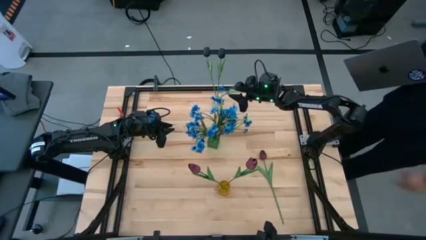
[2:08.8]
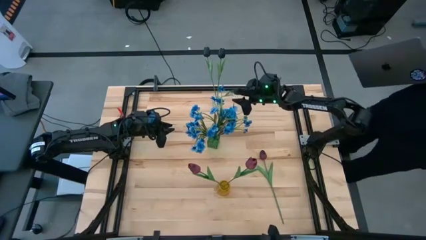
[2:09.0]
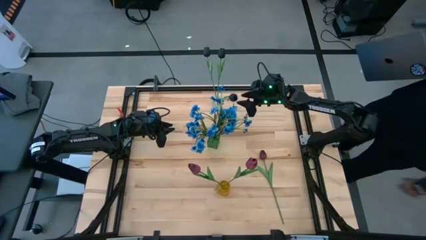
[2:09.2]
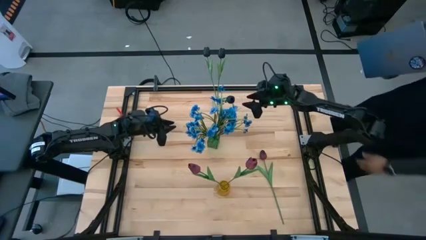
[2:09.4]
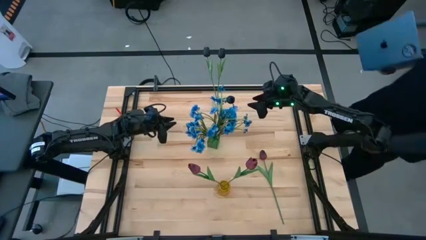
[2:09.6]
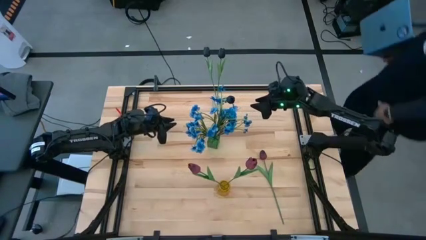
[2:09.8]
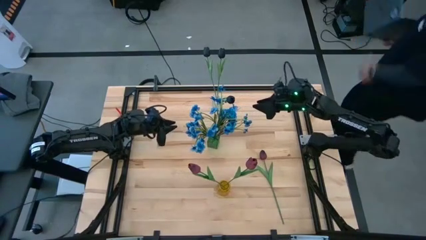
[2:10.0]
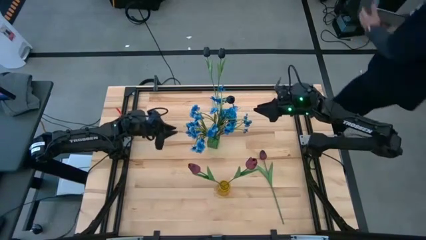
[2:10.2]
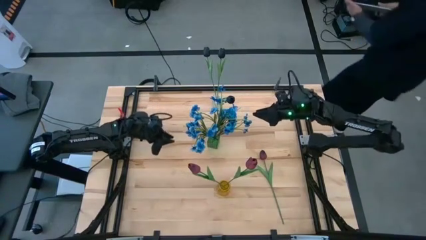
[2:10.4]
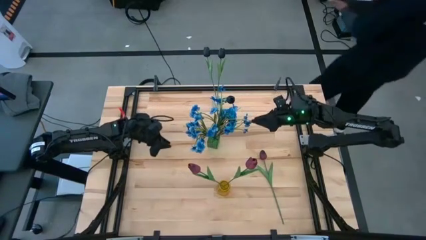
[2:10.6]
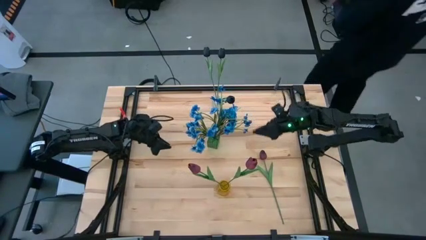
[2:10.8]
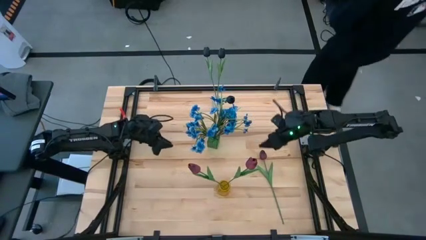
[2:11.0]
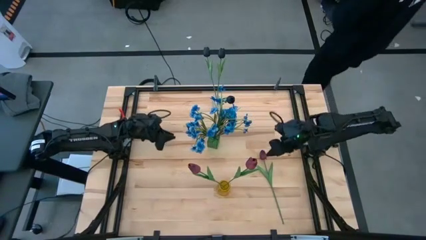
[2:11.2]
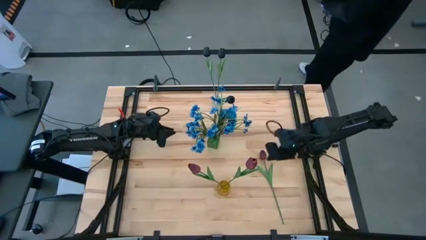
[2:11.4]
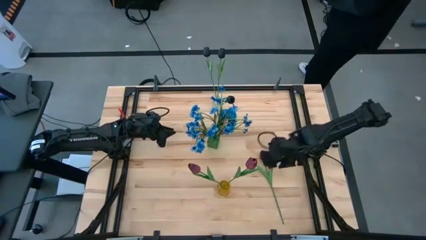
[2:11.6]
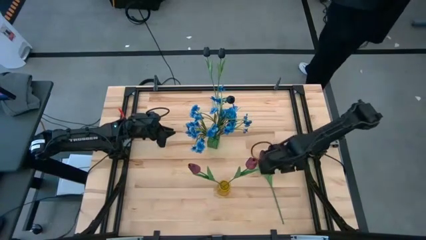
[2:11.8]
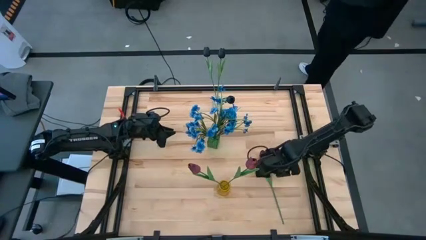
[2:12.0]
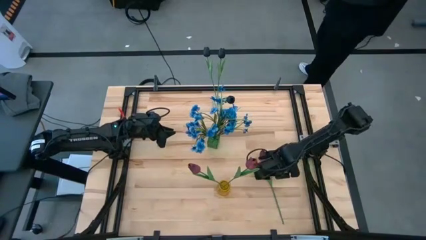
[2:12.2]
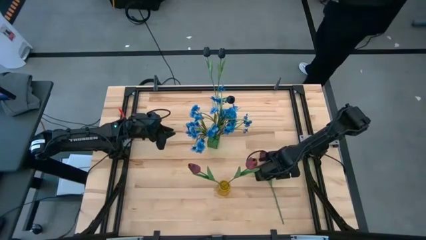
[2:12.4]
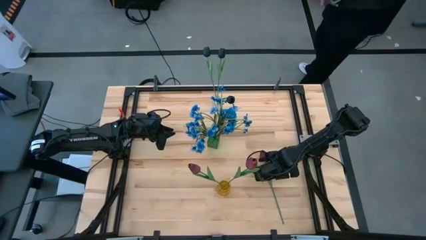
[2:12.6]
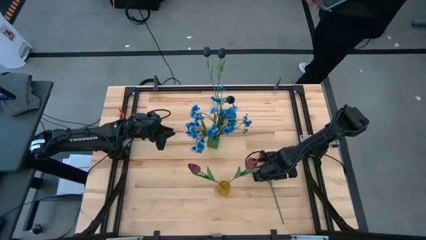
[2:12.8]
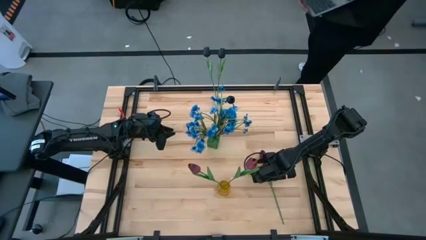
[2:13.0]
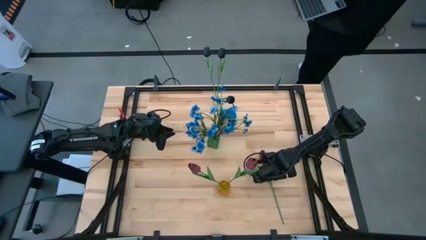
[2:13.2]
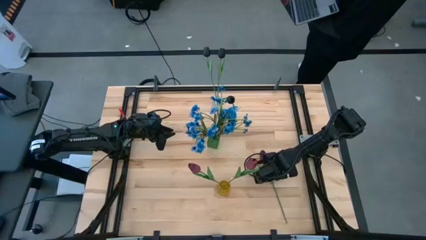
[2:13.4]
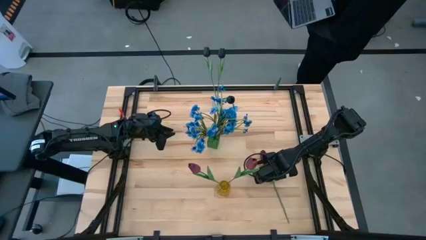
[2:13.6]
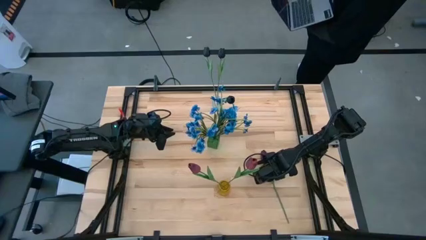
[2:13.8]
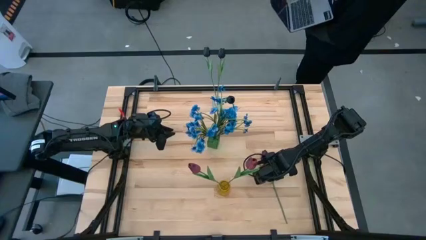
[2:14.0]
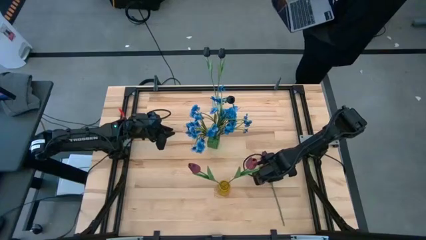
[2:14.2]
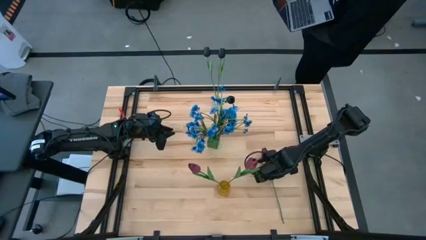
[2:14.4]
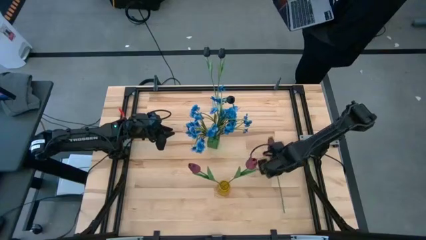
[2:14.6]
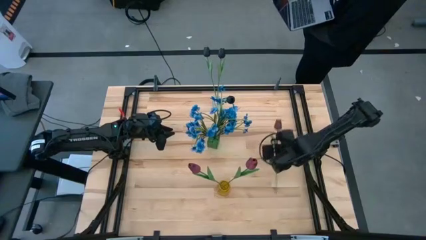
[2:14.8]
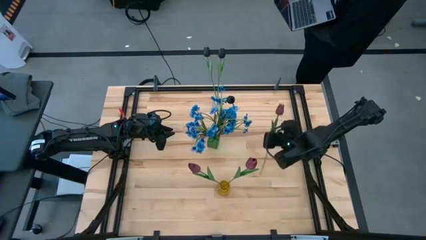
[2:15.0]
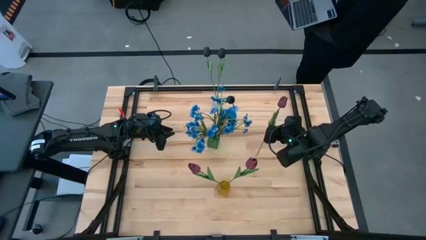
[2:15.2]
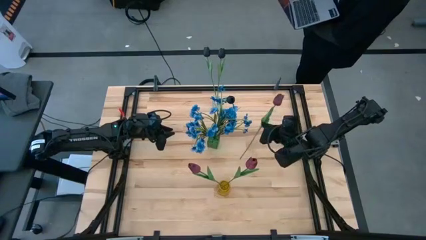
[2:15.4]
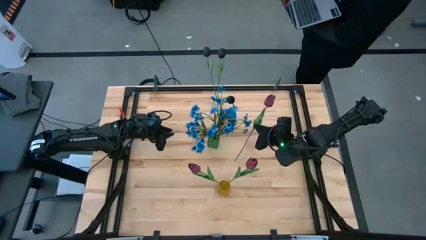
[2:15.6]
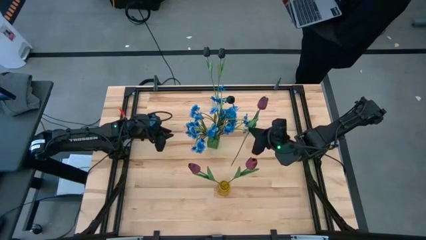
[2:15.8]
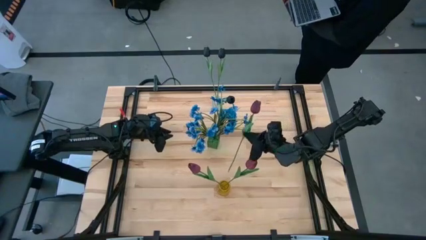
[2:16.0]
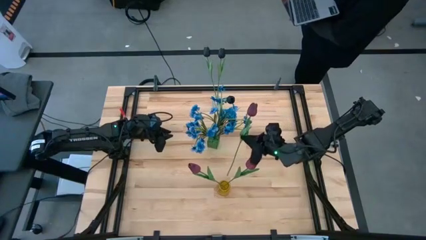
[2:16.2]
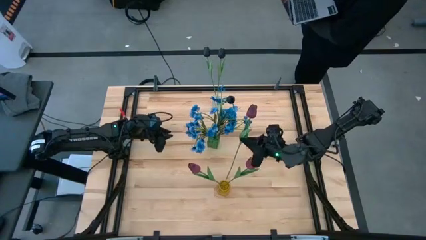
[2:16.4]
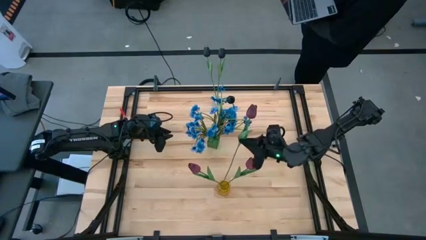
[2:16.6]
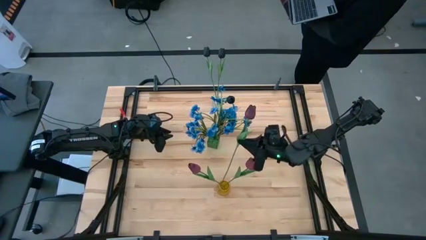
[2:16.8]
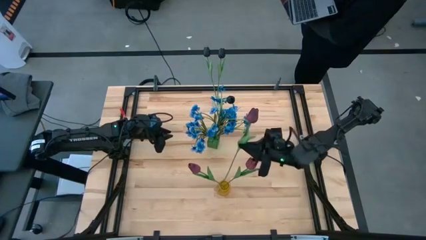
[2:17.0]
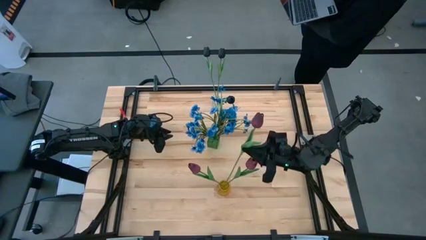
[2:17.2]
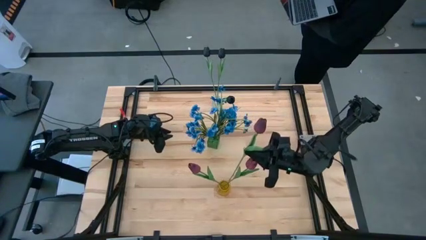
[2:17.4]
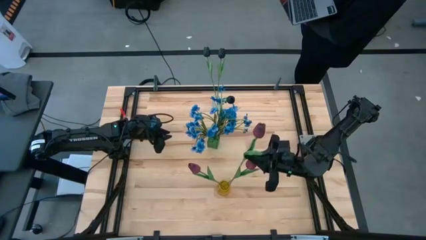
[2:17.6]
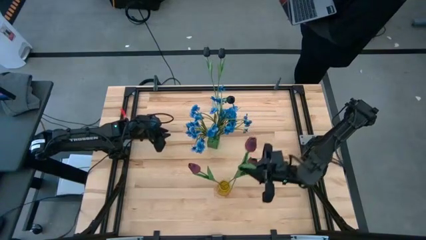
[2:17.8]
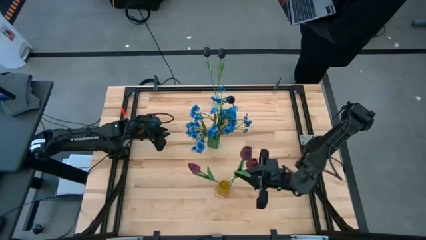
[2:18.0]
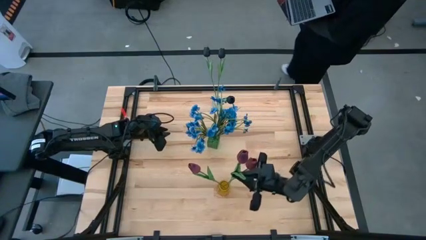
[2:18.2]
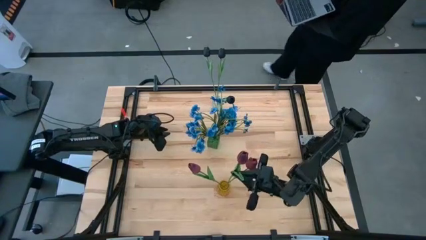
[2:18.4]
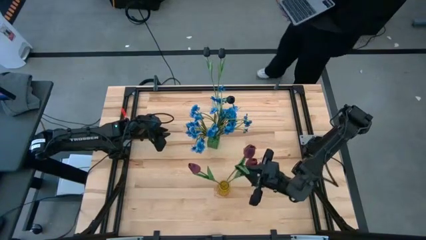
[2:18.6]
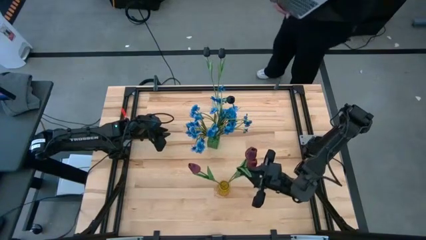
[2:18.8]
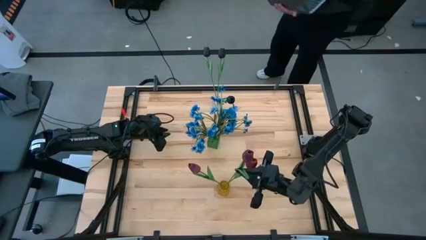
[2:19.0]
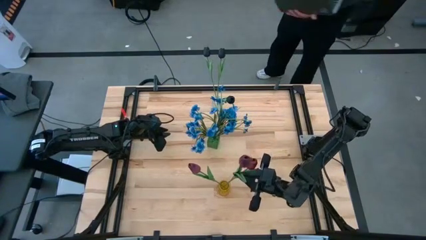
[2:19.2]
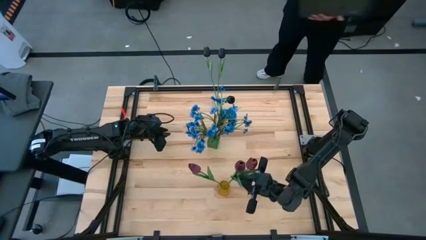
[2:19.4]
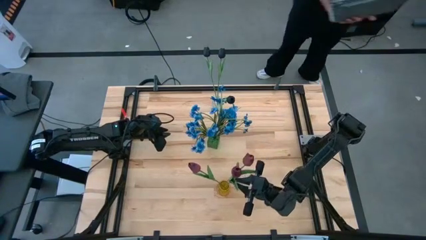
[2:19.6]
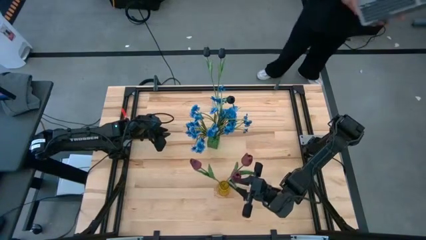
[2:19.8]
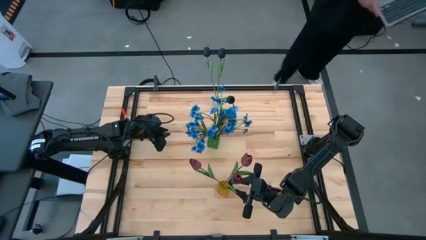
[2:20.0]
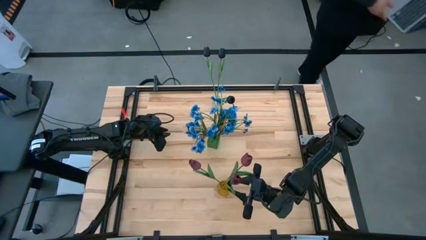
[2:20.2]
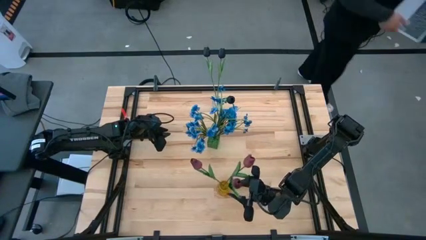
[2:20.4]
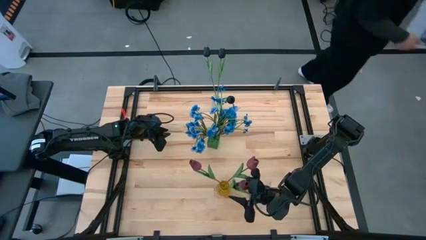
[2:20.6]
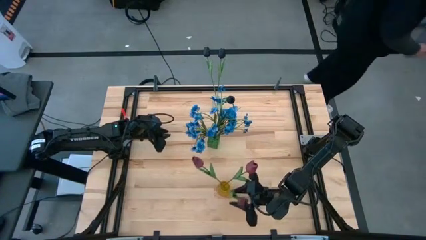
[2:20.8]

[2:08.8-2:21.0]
Task: Sort flowers into vase by color
Put the red tulip into the yellow vase
